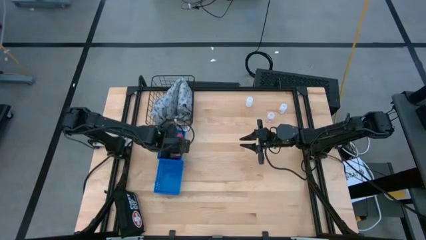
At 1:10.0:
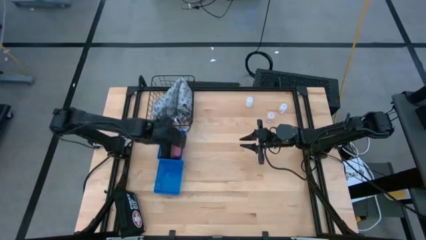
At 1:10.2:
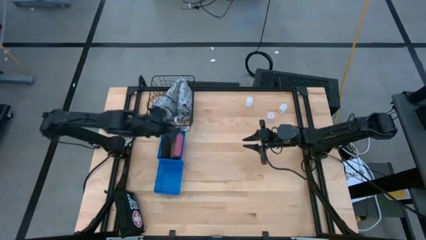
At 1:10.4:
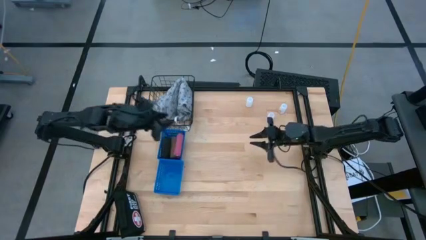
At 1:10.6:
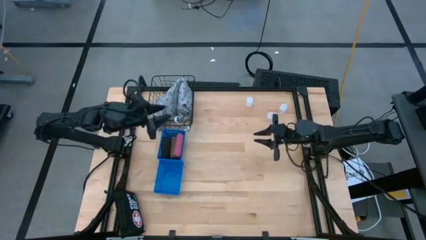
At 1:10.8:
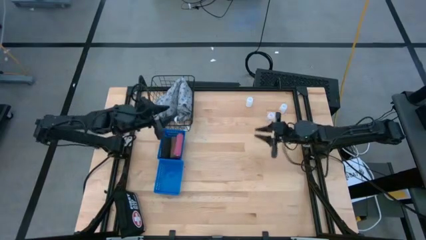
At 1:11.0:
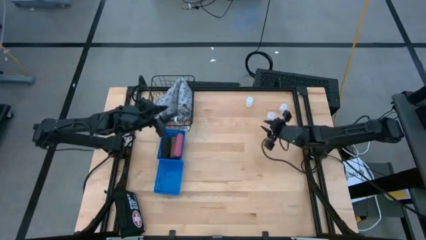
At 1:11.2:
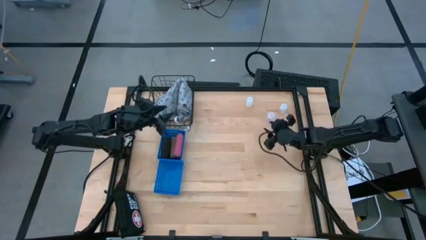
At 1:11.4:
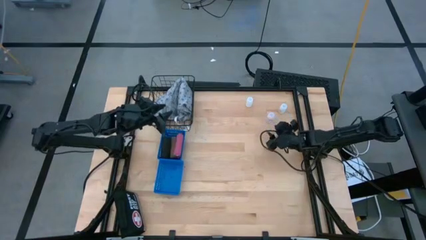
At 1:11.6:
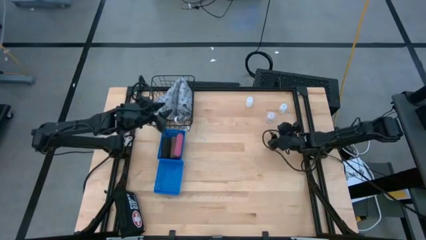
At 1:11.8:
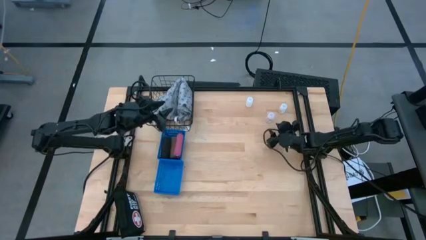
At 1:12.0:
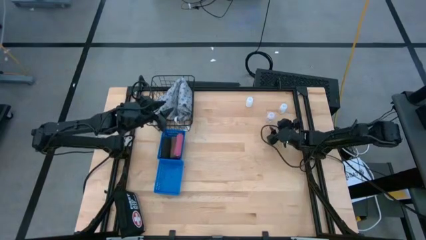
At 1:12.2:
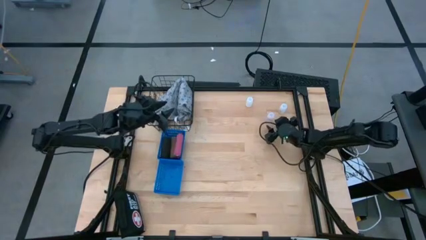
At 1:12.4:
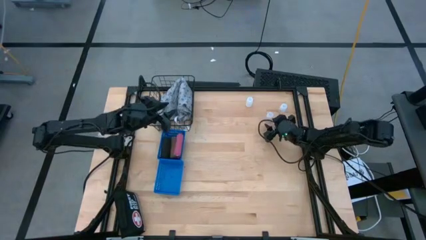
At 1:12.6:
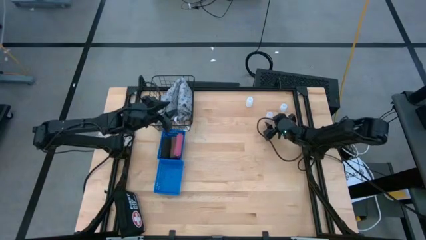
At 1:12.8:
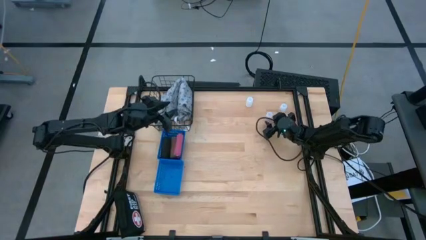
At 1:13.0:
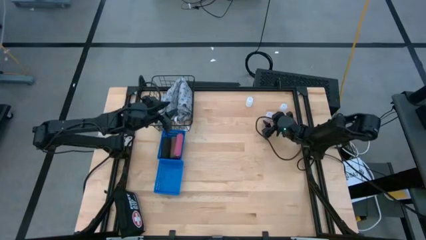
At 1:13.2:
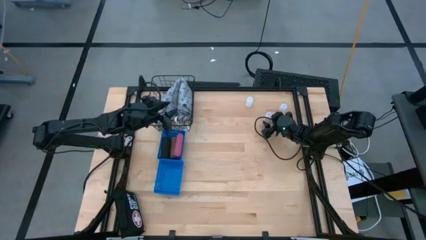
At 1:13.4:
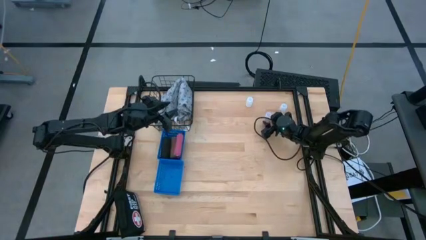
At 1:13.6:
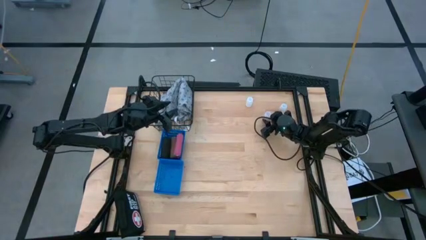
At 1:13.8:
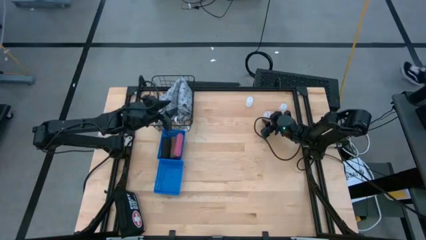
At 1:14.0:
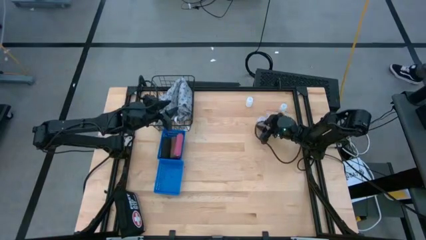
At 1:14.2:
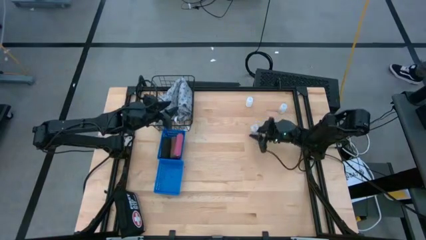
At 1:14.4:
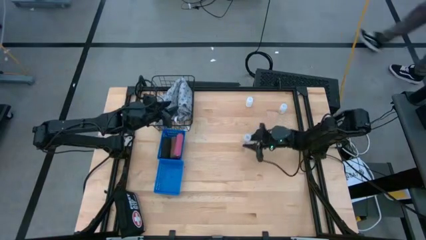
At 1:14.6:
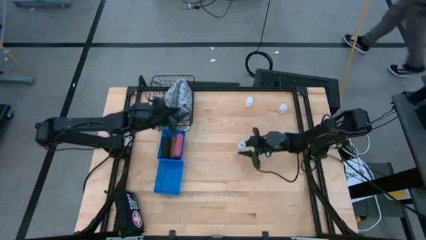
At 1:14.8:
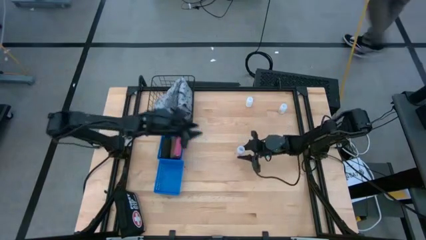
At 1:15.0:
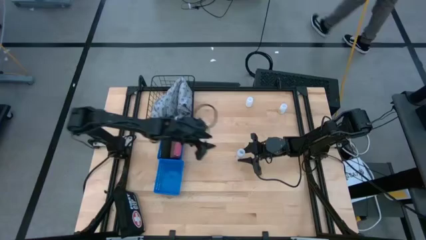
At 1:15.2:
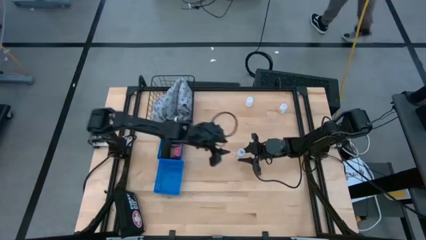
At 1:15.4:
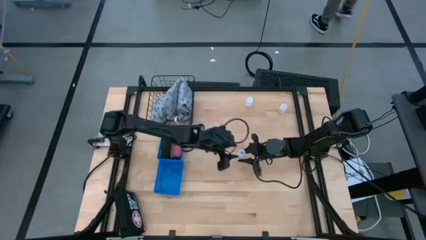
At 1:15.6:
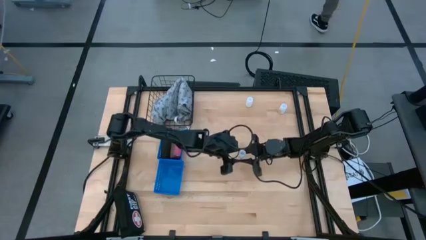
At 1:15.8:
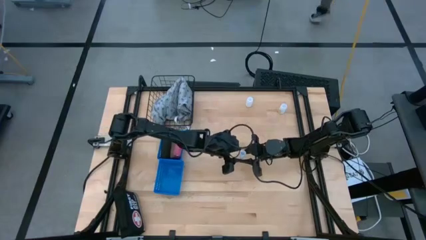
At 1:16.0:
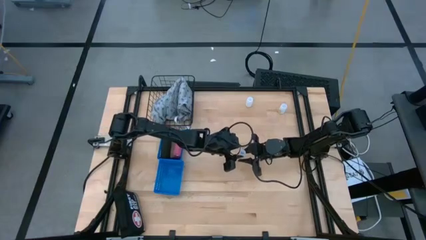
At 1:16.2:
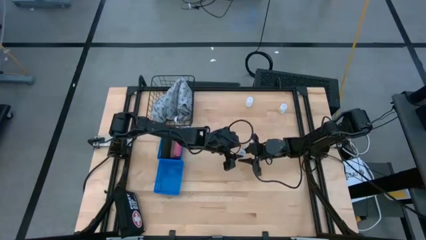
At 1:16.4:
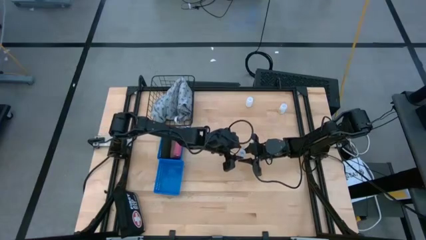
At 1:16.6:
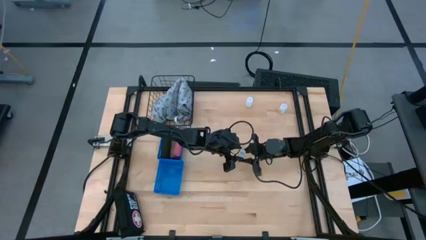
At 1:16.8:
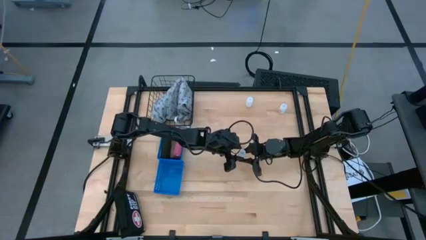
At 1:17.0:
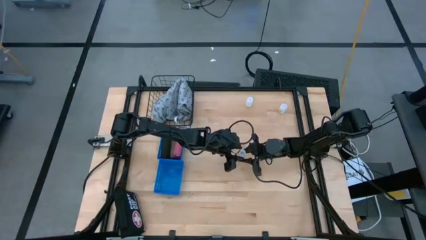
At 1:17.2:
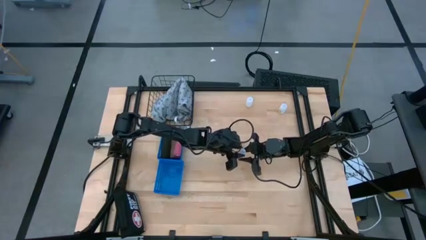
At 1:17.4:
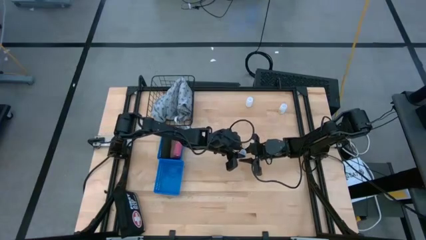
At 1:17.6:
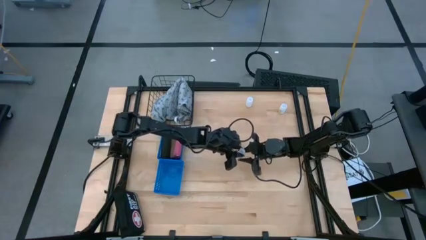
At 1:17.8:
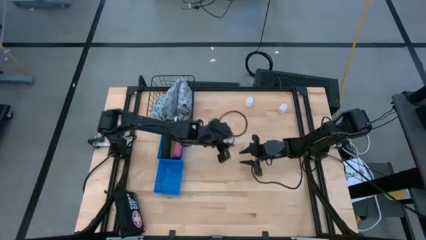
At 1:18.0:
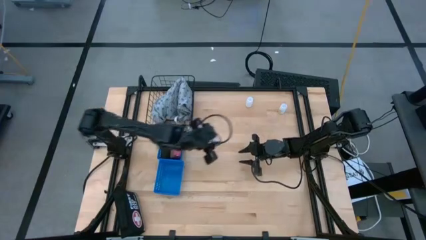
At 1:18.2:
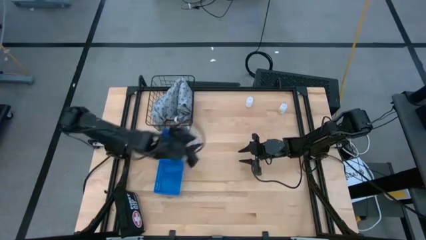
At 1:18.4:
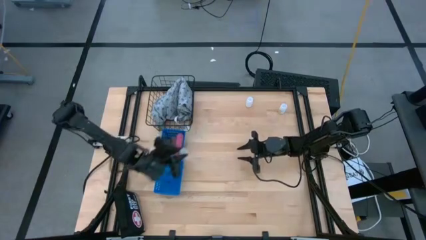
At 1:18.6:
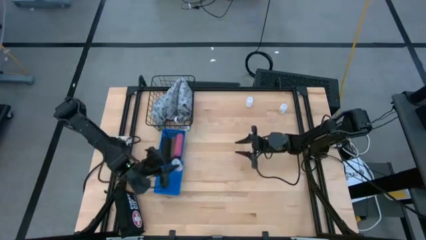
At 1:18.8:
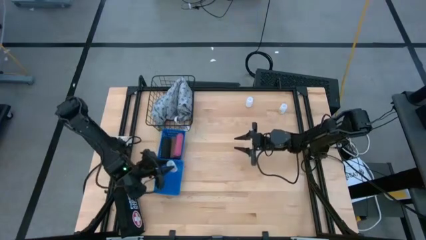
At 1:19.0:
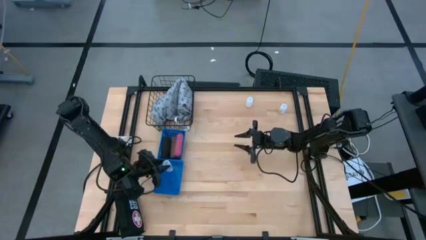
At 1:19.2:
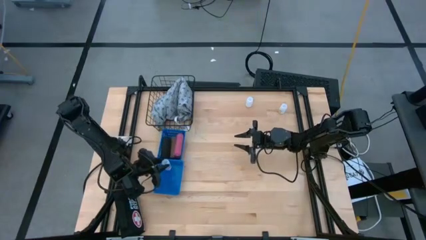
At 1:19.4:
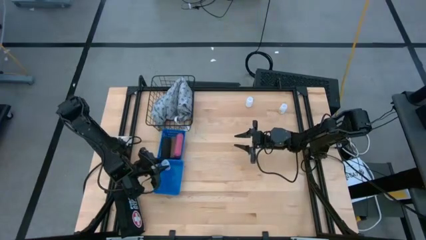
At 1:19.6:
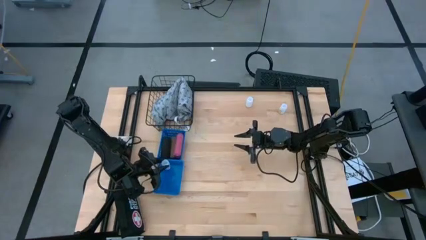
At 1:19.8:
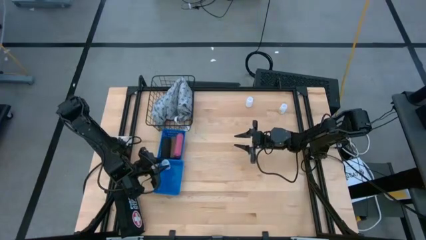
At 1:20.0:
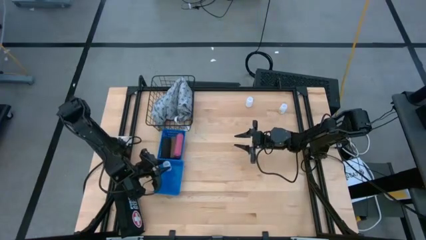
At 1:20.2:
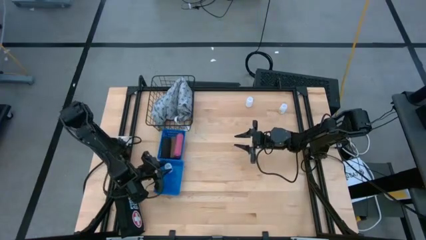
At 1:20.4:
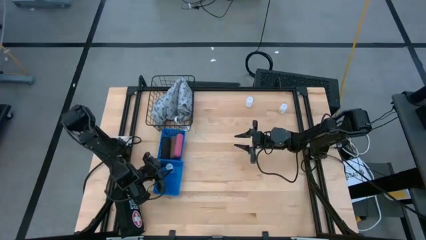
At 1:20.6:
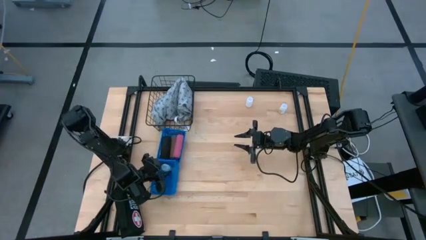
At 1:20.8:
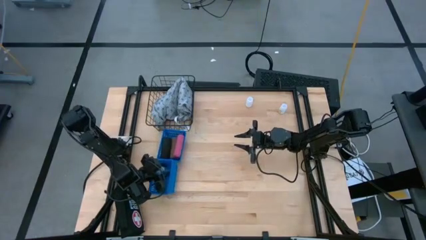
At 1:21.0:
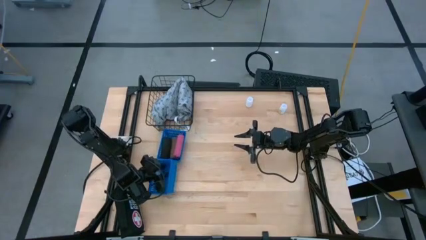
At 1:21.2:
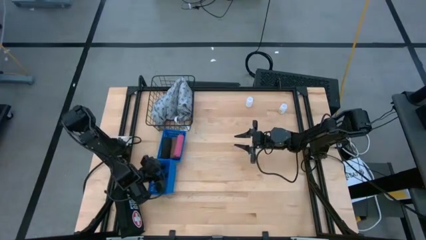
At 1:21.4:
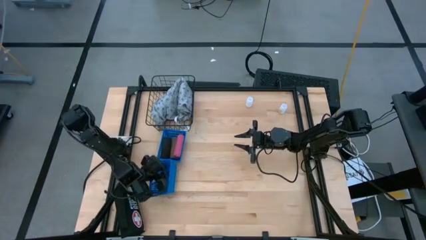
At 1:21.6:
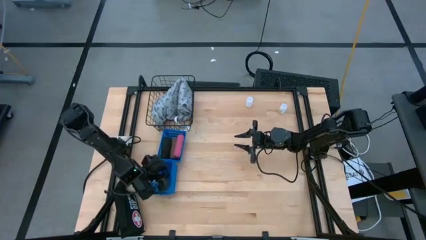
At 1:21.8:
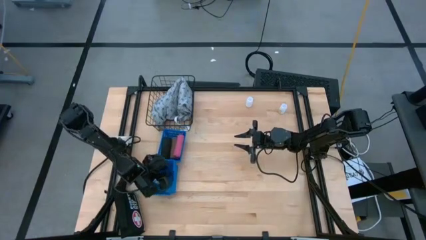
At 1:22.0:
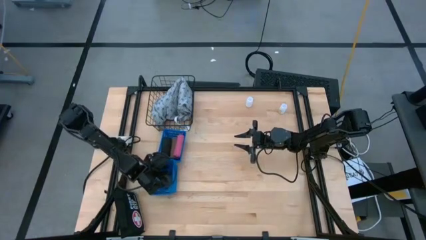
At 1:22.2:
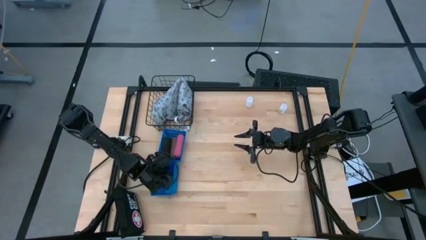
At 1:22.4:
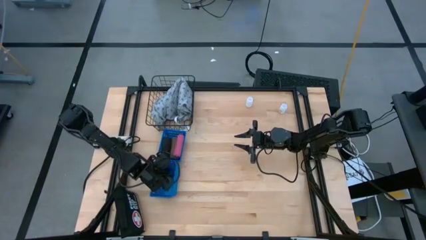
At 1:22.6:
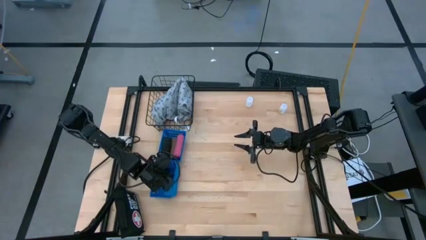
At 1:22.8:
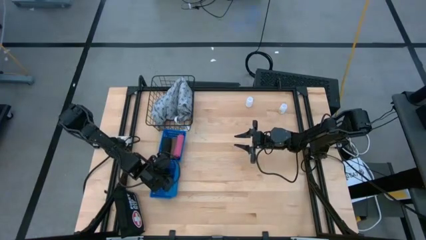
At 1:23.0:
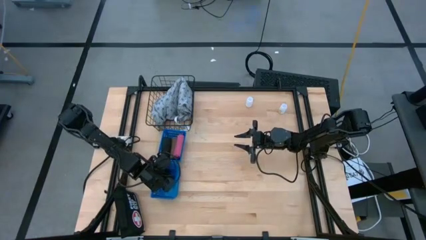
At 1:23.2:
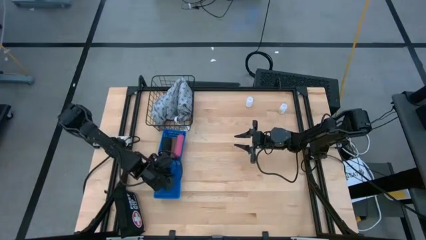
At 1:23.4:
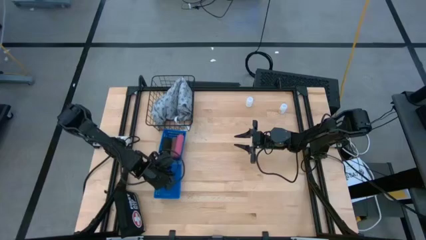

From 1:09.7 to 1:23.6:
Task: Pick & Place Medicine items
Put the bottom transparent bottle into the bottom blue basket
